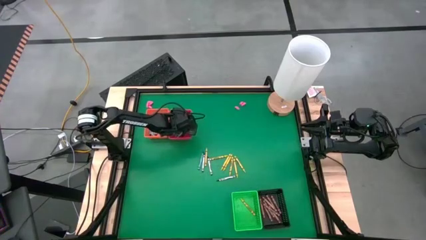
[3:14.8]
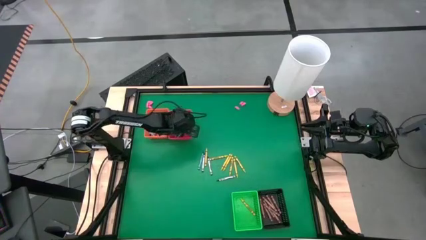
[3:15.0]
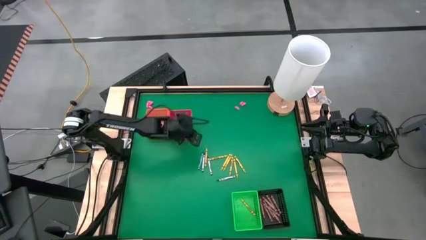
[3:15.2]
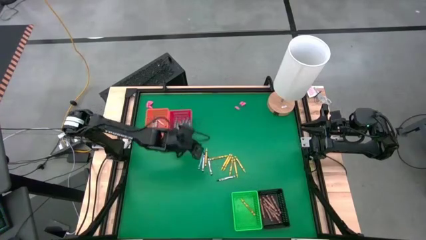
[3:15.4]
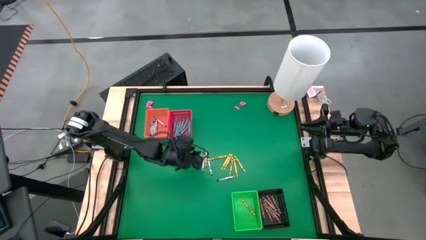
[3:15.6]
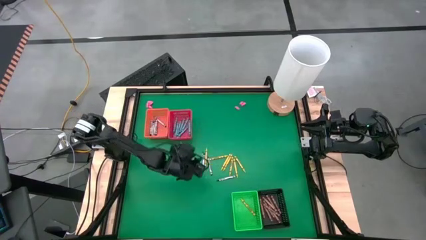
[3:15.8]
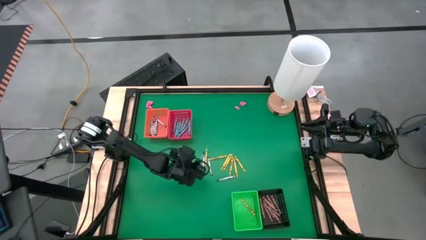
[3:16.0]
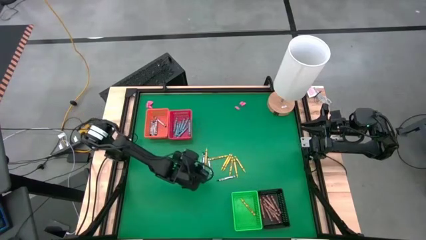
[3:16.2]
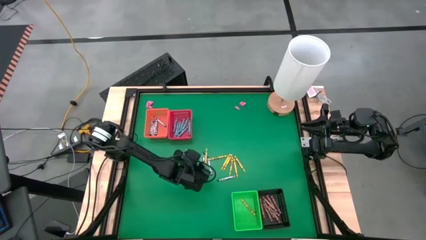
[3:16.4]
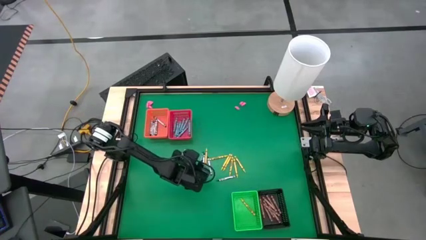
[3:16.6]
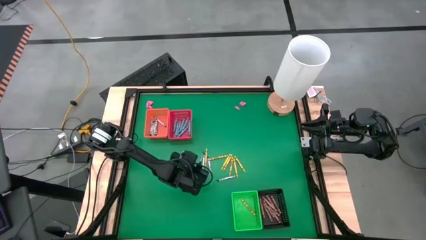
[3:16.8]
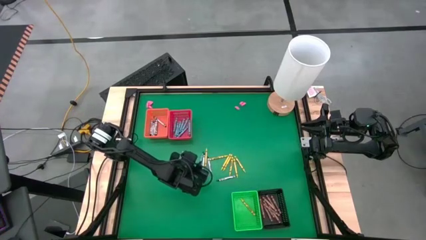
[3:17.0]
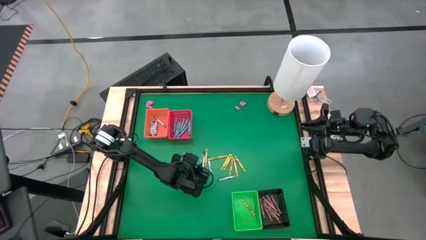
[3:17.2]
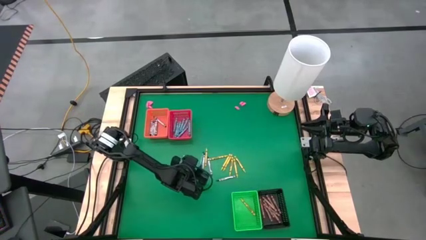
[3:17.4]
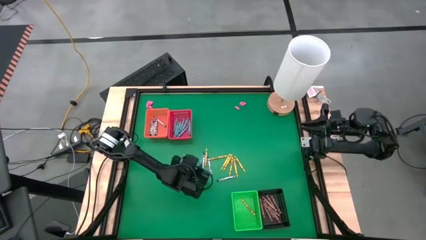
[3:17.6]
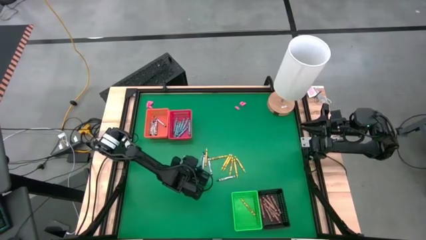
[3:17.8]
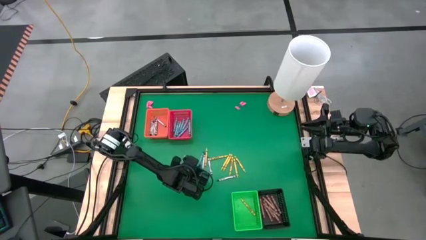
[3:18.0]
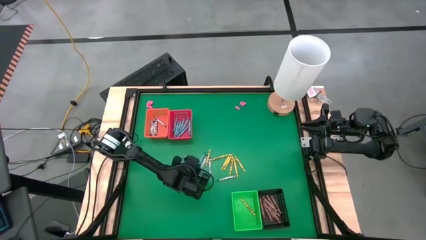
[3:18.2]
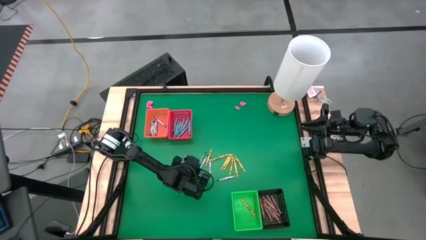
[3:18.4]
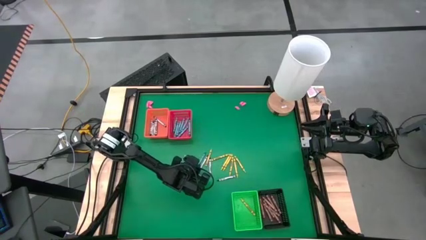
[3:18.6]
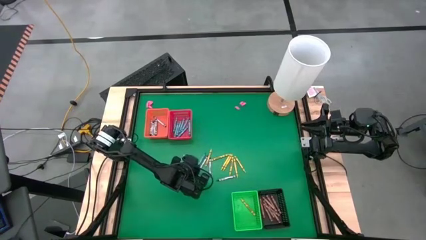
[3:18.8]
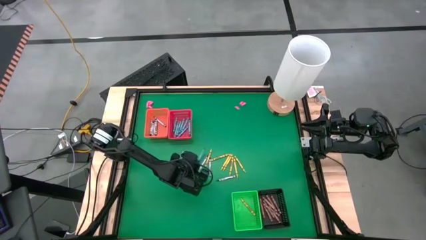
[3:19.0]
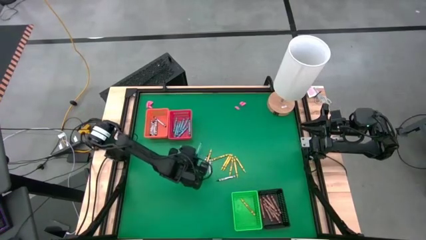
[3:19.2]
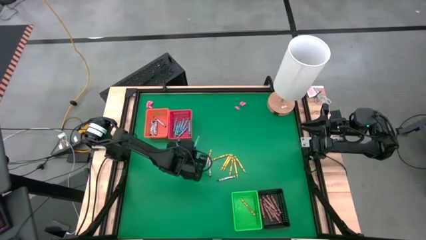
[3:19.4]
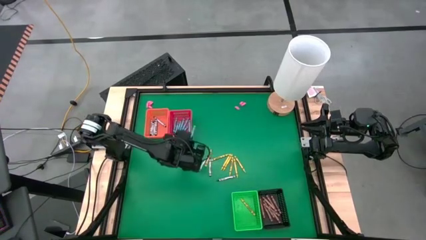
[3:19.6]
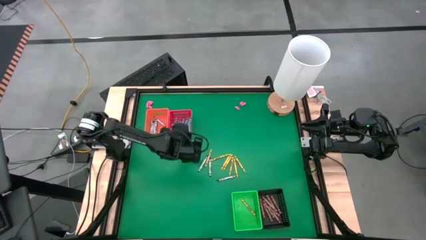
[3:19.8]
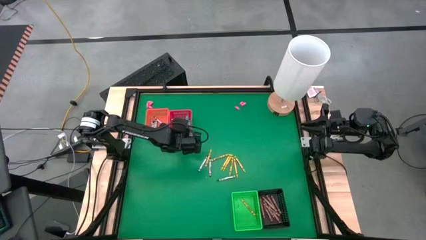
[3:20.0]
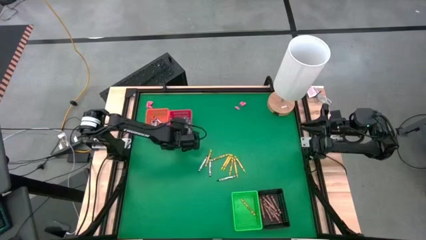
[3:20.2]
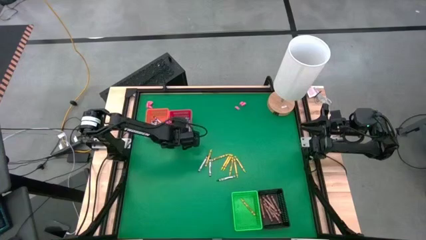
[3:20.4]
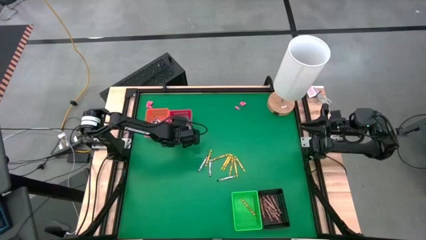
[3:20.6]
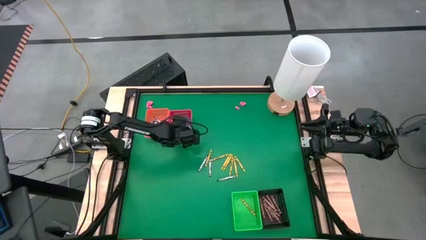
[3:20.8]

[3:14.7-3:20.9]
Task: Sort crayons
Put the blue crayon into the red bin

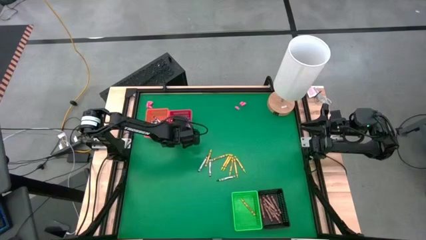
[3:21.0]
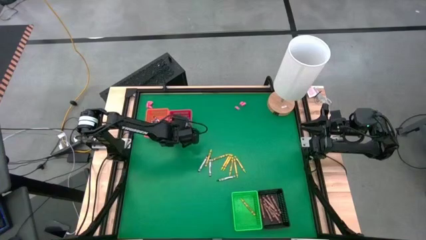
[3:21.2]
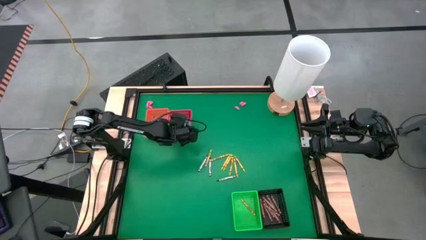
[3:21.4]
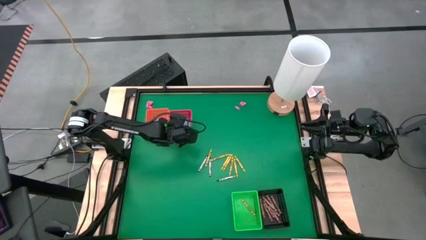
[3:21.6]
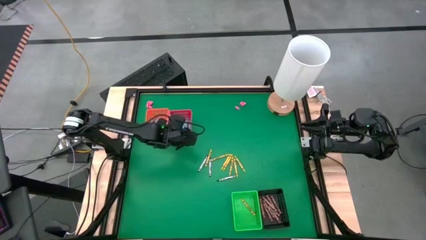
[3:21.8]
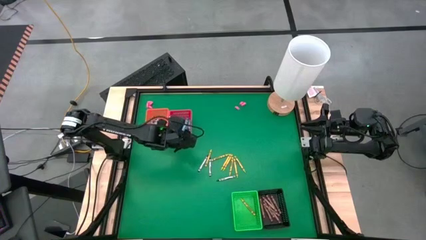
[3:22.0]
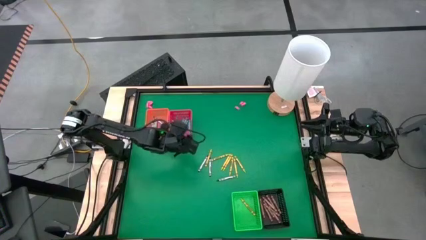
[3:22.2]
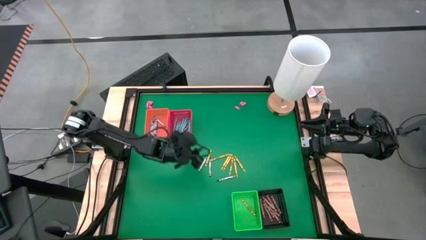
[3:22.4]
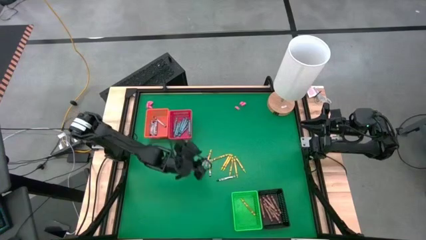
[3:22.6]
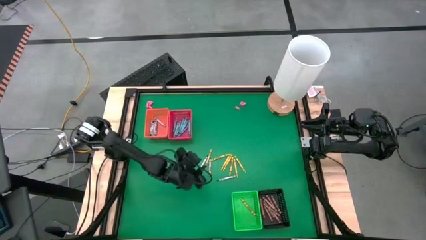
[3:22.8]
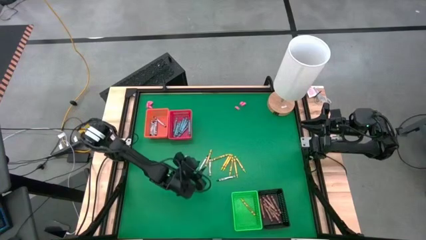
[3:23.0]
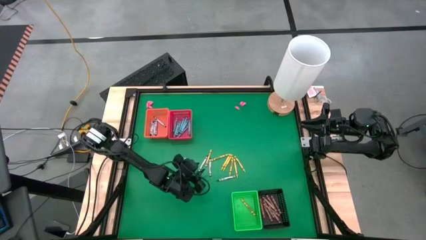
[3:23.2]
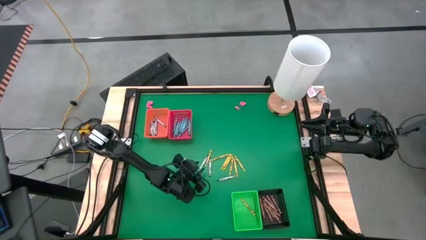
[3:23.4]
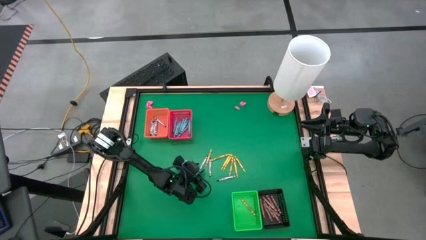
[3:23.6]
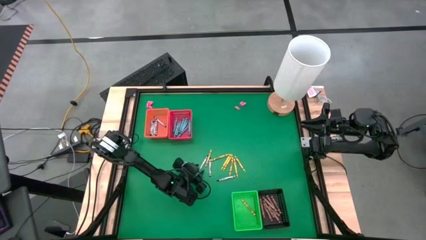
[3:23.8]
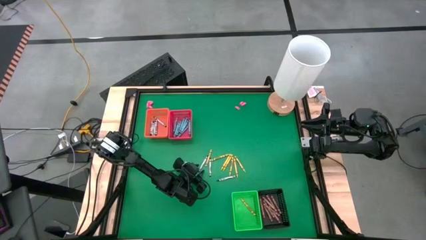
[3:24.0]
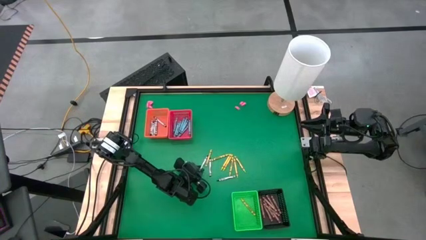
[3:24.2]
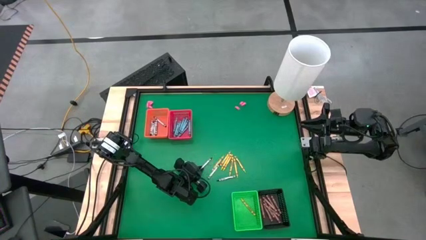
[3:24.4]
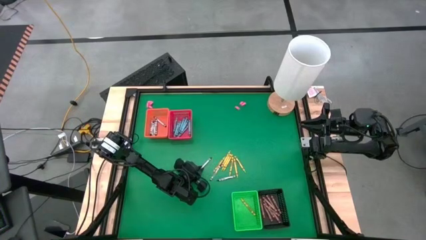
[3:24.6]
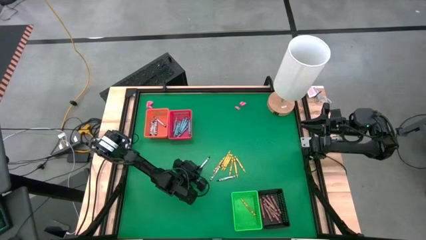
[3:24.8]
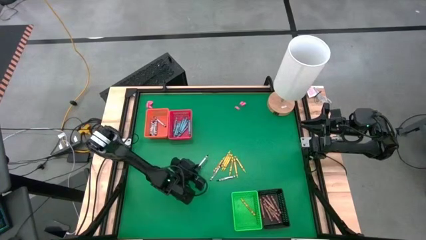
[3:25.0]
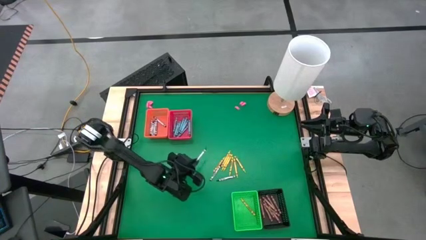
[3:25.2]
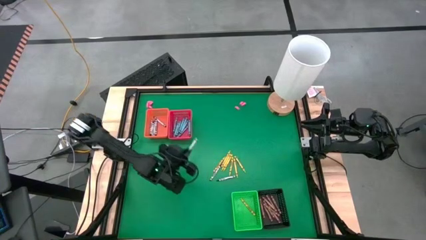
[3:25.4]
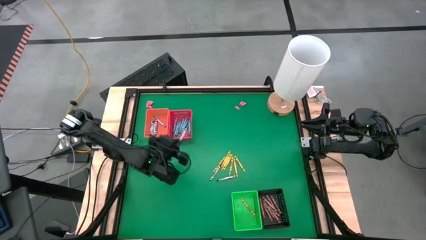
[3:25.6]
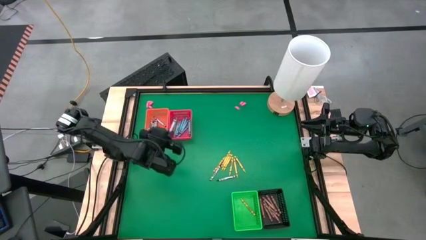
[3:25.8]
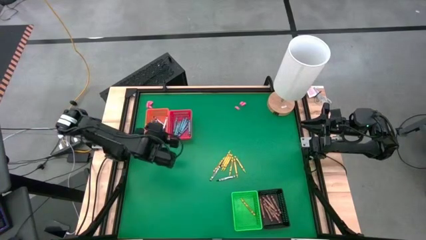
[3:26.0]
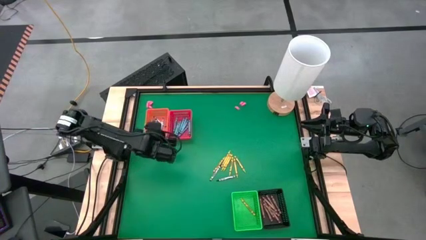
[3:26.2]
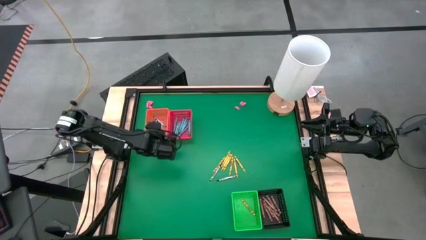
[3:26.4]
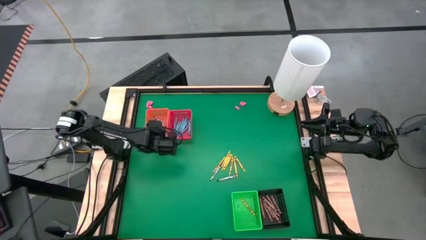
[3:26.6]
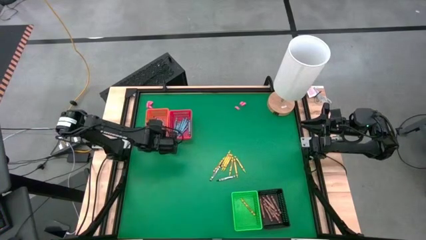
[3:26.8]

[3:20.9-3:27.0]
Put the black crayon into the orange bin

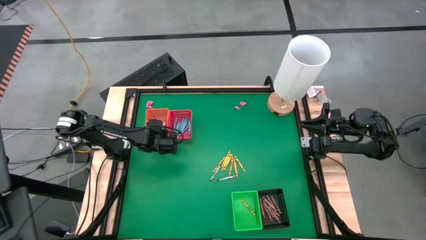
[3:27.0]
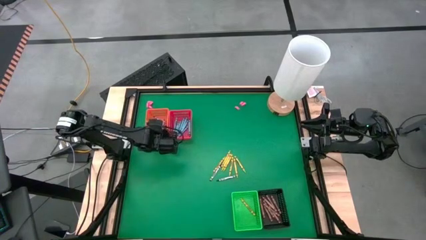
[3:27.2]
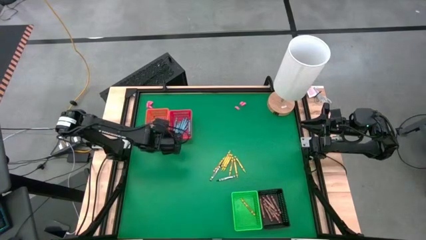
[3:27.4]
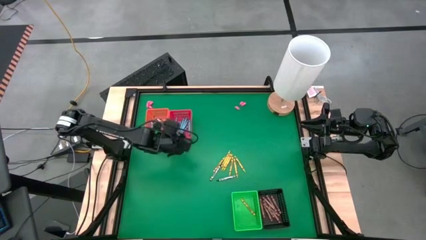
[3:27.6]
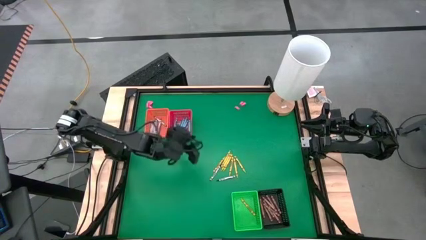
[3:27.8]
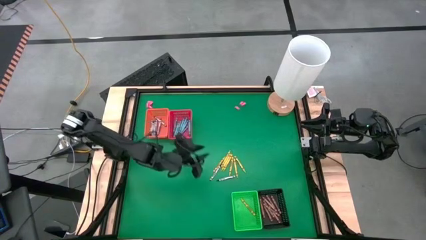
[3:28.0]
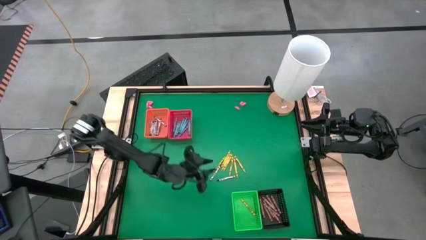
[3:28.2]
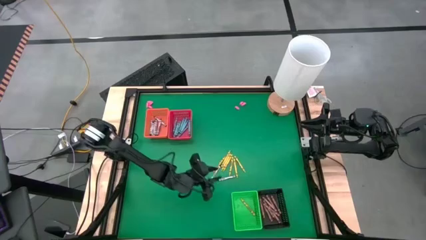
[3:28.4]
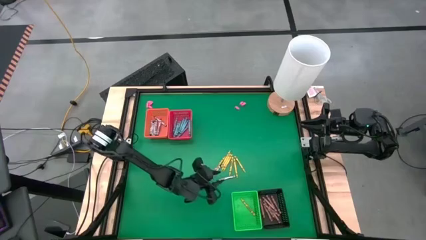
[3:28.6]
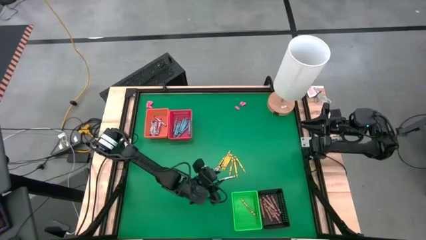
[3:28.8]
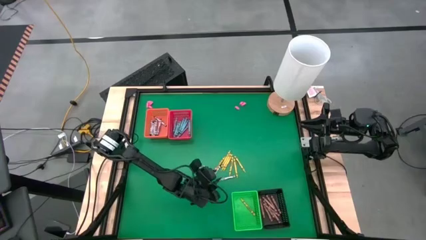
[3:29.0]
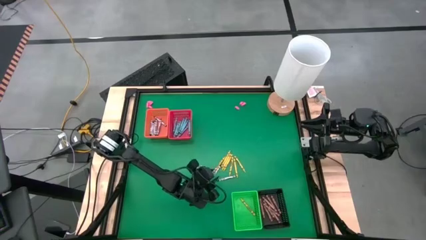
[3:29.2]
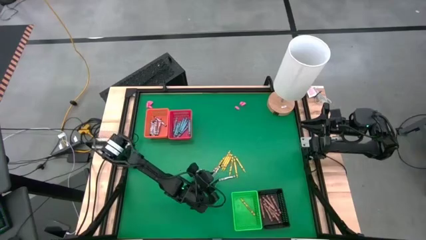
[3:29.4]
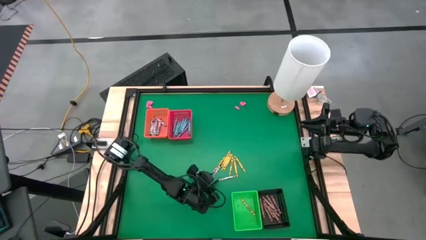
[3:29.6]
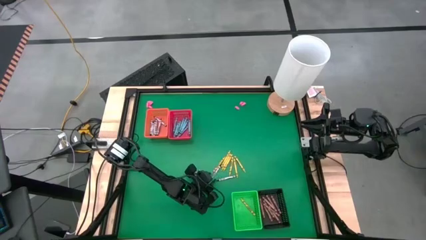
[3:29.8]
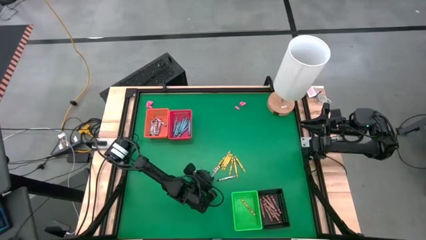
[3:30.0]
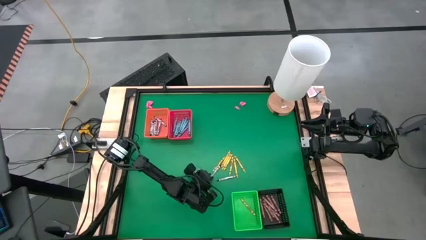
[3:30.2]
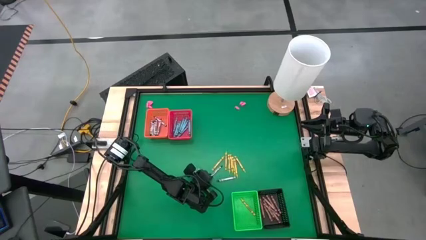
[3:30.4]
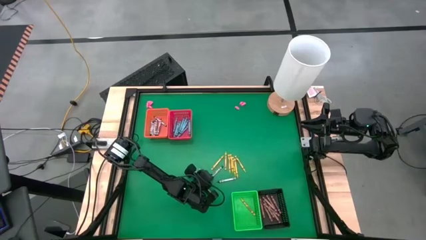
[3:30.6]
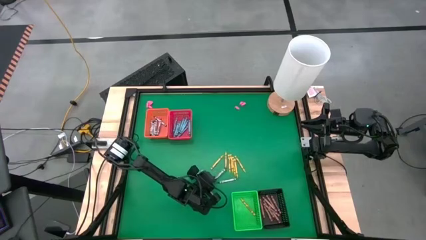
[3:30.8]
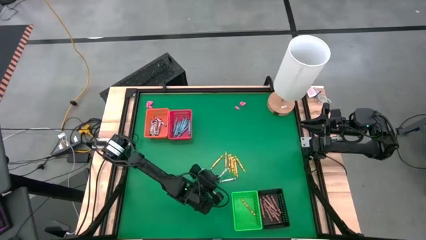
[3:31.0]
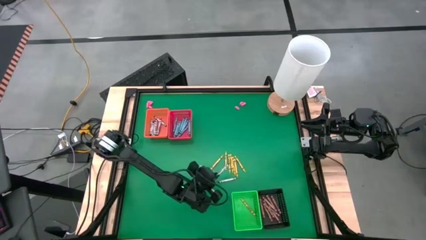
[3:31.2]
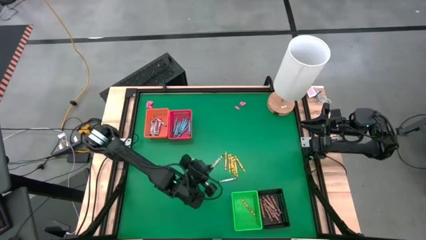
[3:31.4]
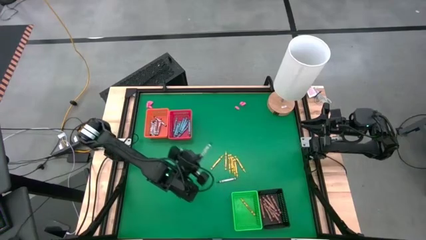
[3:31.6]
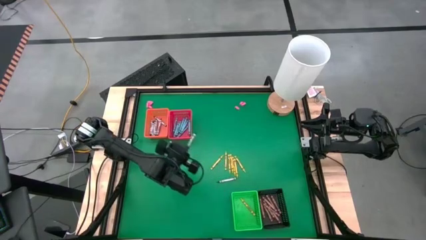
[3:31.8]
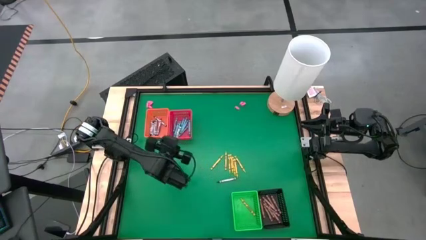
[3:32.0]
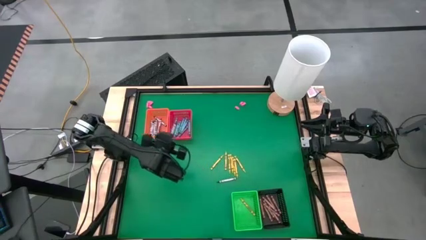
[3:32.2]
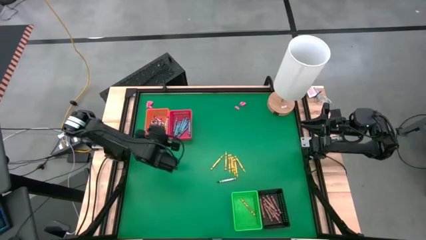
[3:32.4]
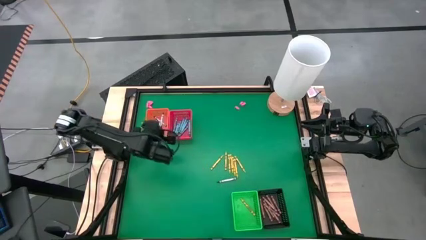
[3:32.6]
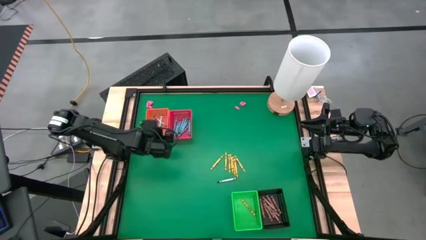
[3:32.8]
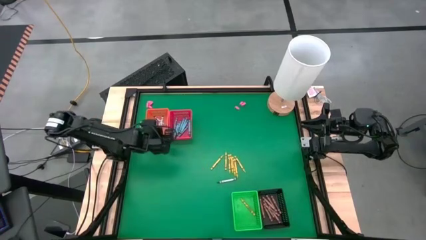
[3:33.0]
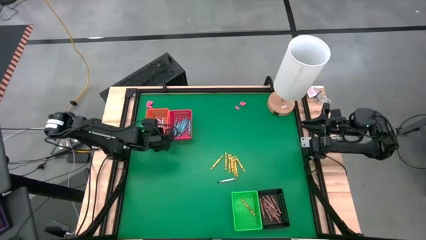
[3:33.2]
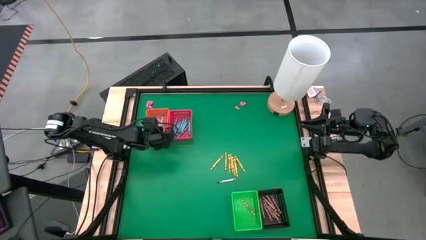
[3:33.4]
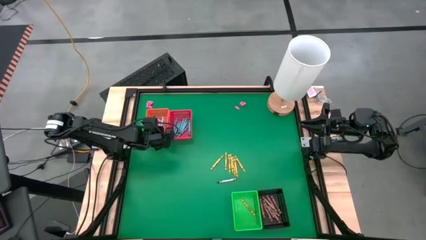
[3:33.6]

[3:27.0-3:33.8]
Put the black crayon into the orange bin
